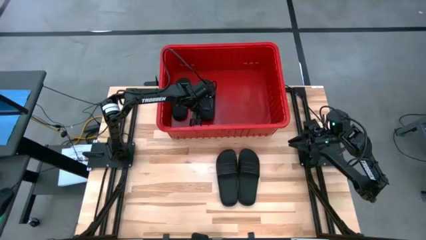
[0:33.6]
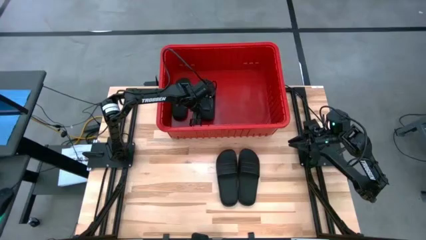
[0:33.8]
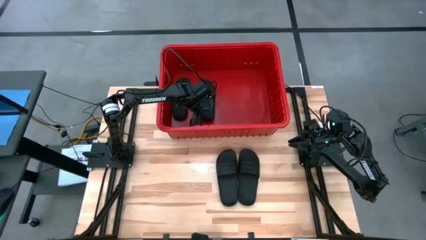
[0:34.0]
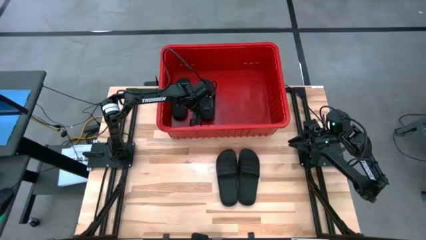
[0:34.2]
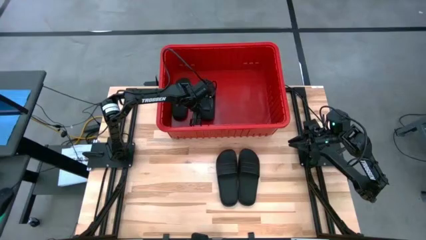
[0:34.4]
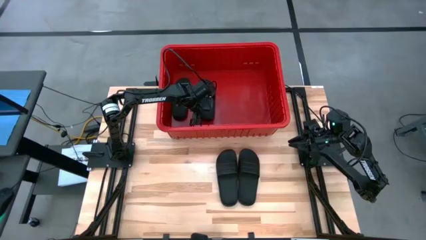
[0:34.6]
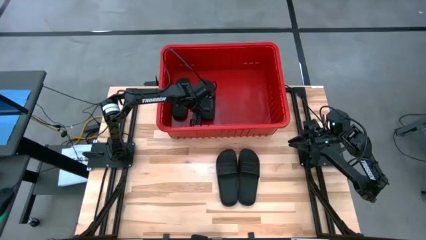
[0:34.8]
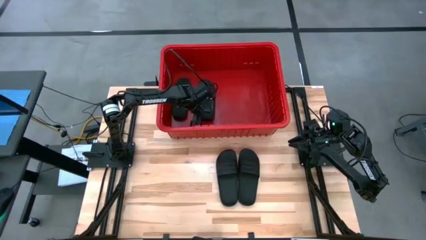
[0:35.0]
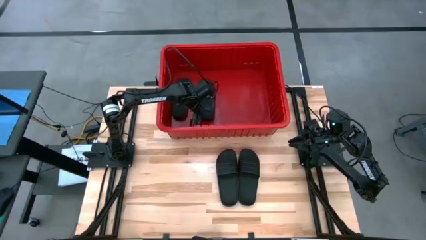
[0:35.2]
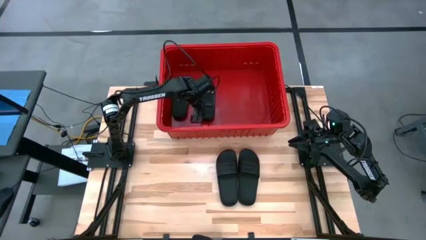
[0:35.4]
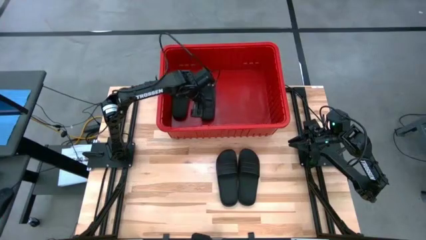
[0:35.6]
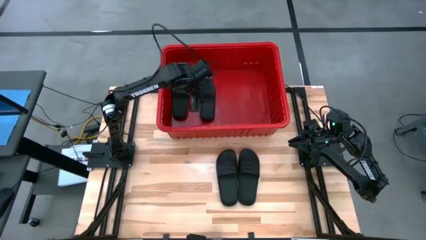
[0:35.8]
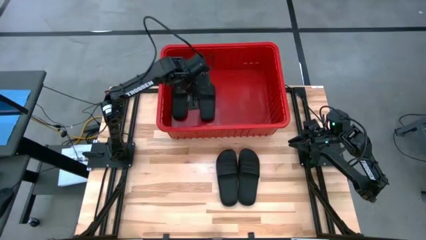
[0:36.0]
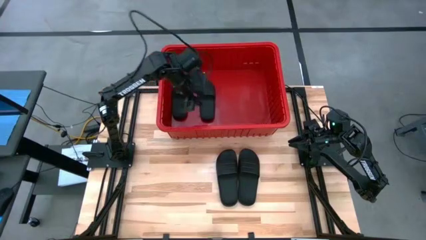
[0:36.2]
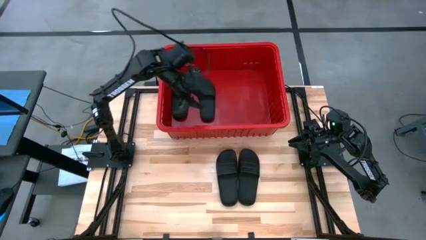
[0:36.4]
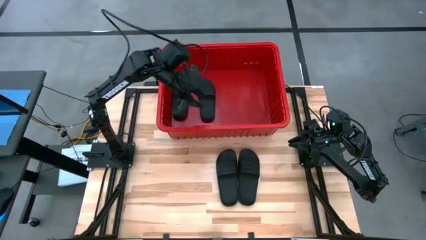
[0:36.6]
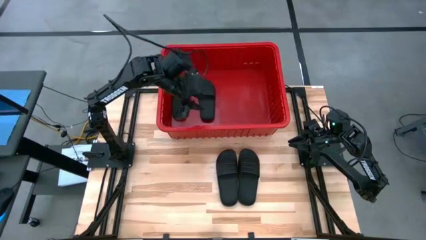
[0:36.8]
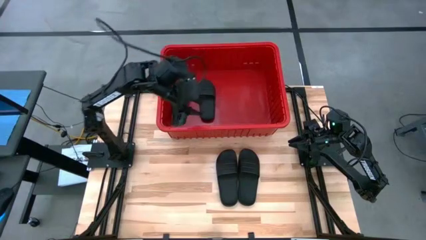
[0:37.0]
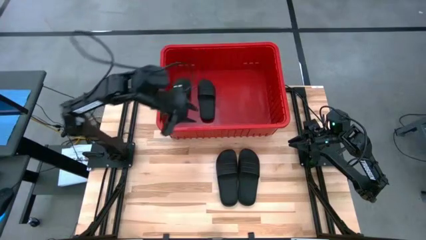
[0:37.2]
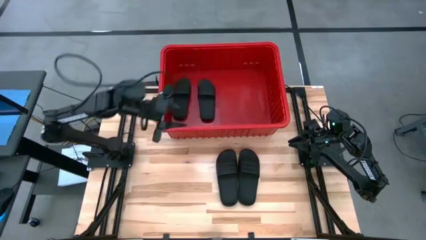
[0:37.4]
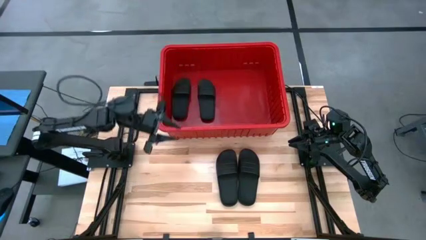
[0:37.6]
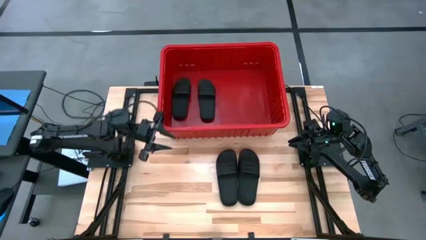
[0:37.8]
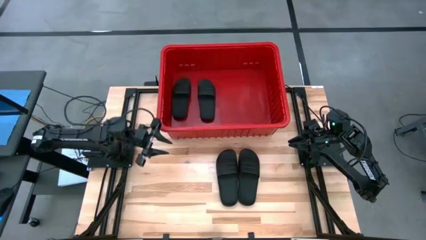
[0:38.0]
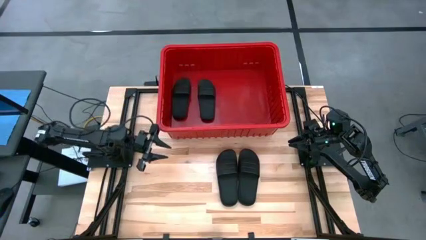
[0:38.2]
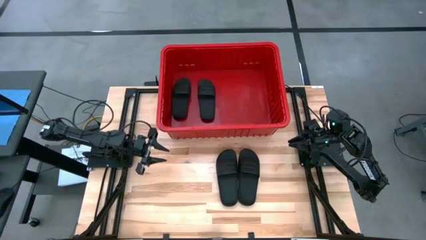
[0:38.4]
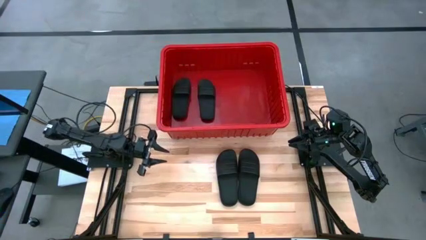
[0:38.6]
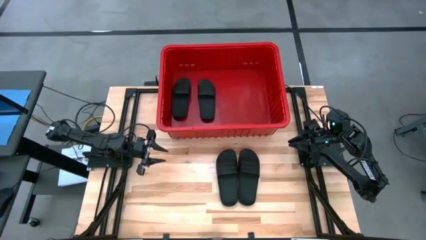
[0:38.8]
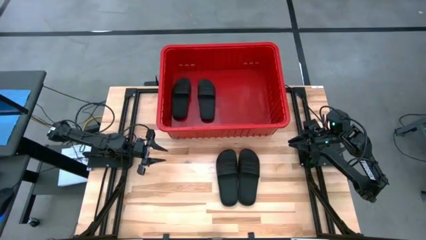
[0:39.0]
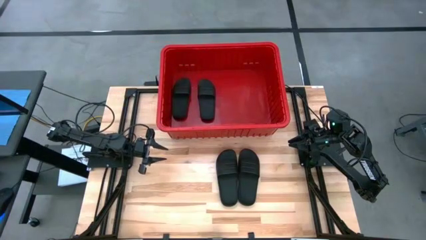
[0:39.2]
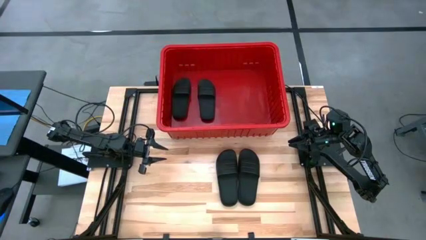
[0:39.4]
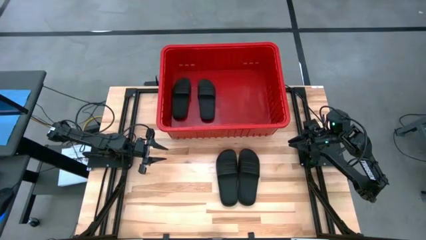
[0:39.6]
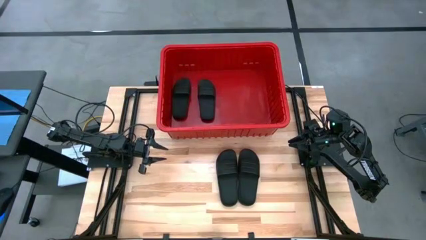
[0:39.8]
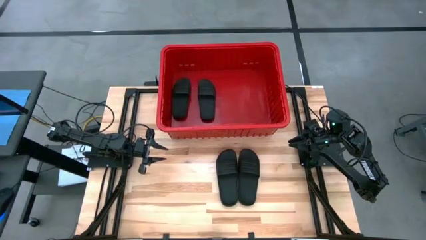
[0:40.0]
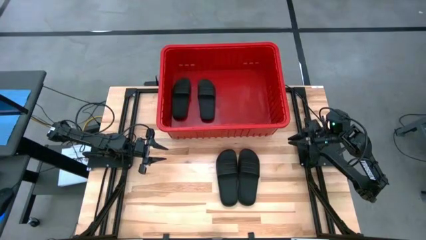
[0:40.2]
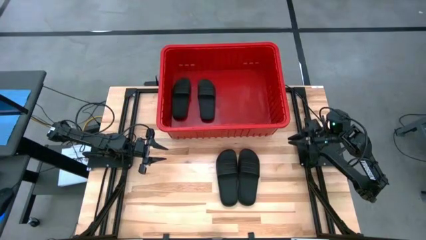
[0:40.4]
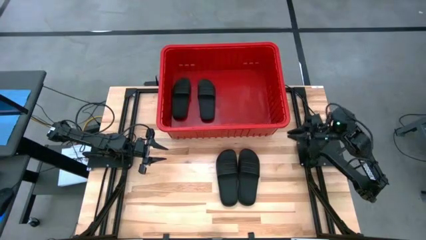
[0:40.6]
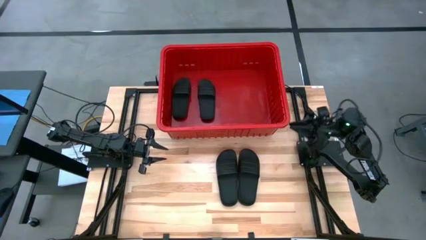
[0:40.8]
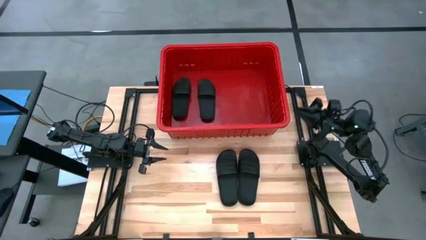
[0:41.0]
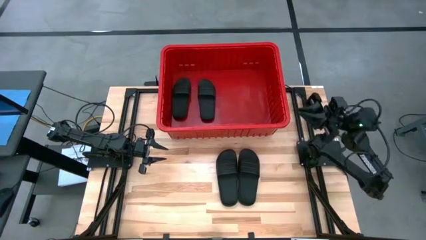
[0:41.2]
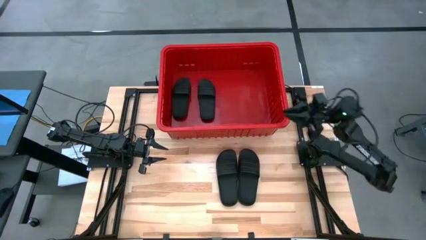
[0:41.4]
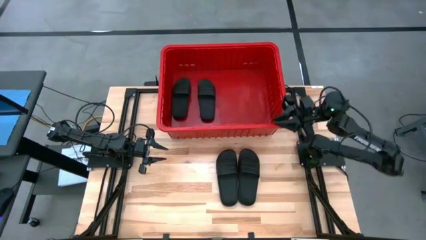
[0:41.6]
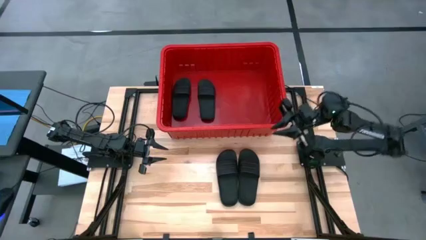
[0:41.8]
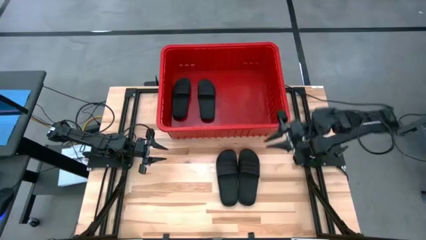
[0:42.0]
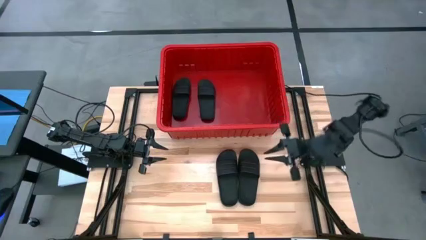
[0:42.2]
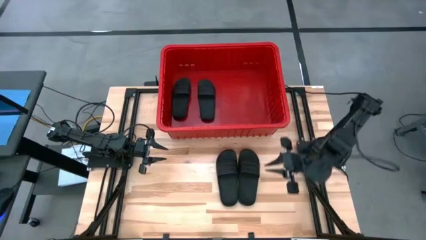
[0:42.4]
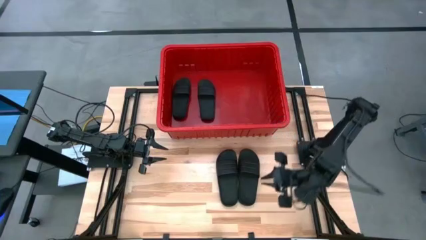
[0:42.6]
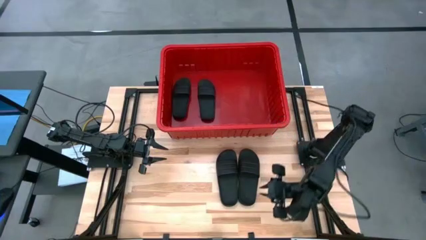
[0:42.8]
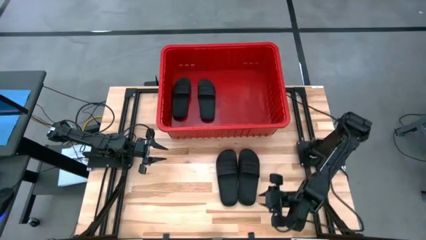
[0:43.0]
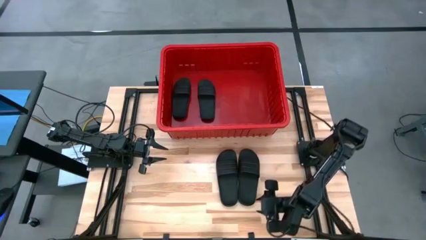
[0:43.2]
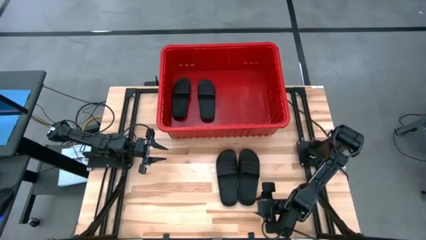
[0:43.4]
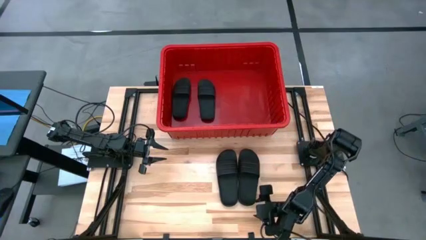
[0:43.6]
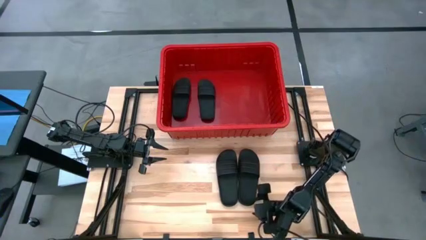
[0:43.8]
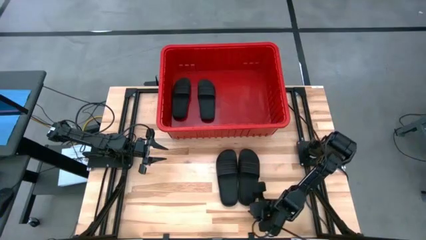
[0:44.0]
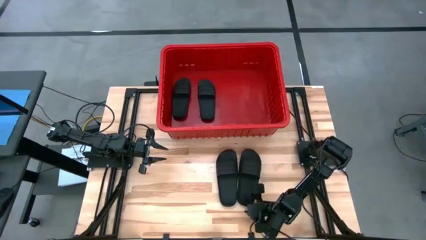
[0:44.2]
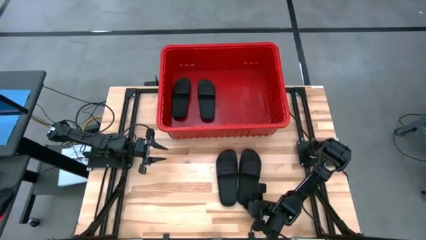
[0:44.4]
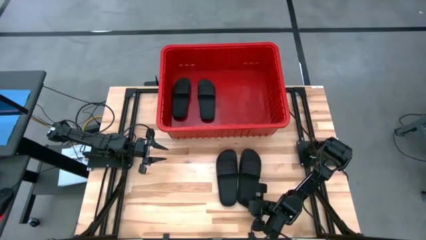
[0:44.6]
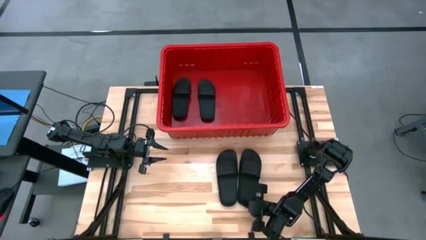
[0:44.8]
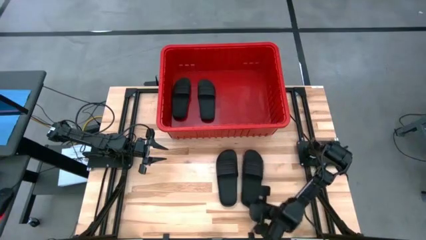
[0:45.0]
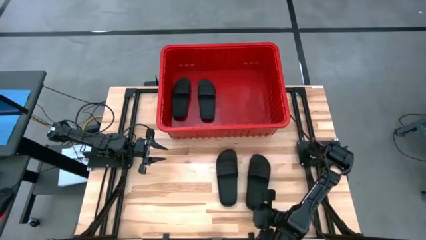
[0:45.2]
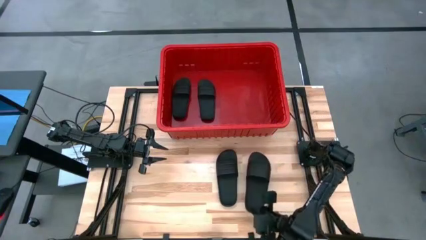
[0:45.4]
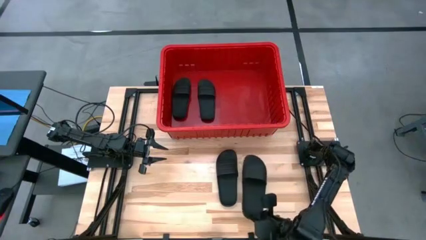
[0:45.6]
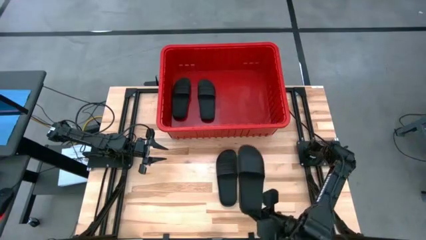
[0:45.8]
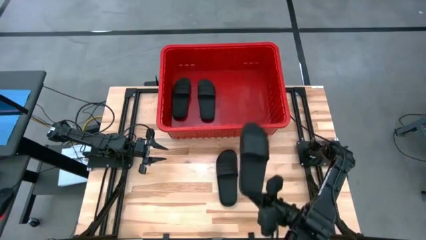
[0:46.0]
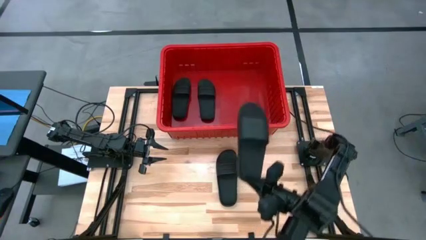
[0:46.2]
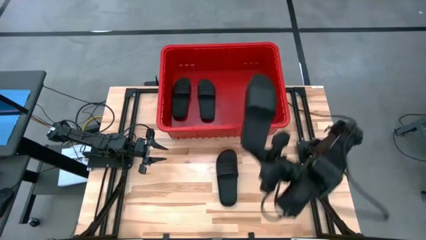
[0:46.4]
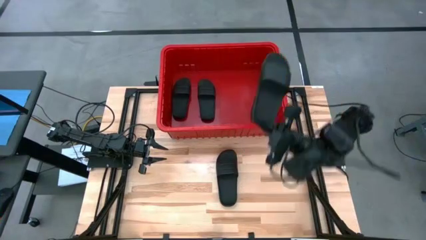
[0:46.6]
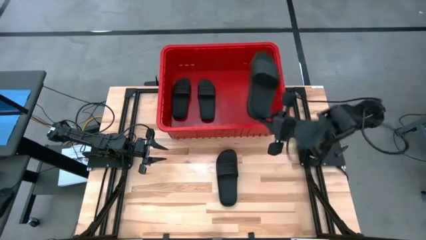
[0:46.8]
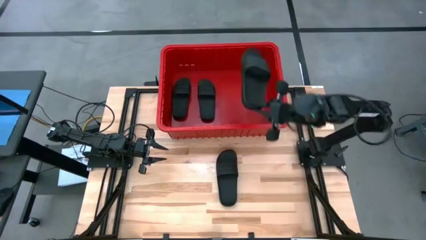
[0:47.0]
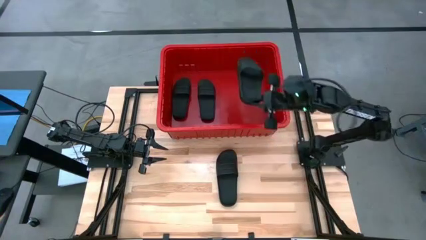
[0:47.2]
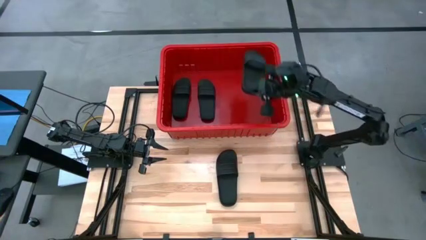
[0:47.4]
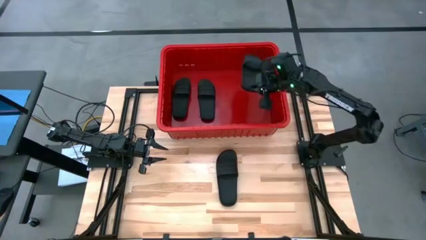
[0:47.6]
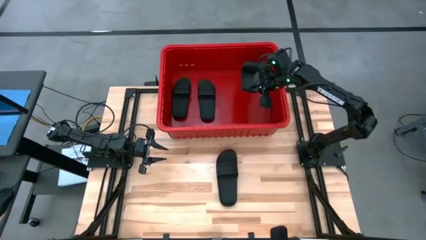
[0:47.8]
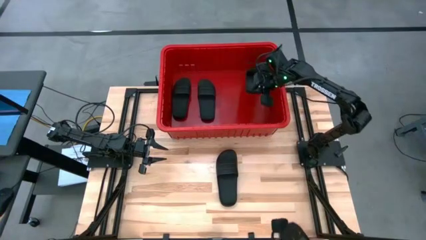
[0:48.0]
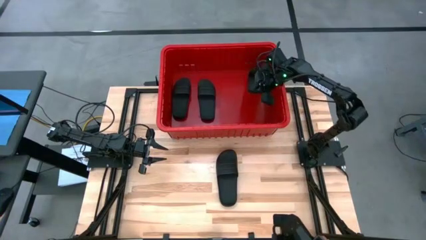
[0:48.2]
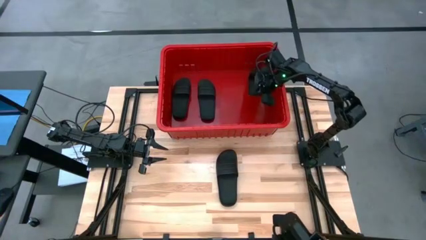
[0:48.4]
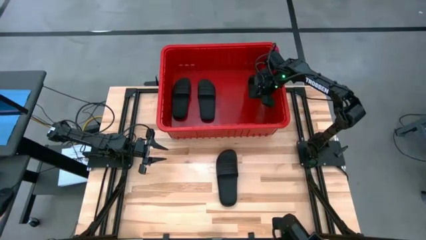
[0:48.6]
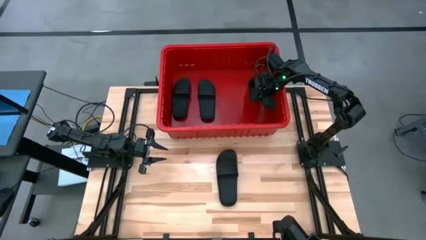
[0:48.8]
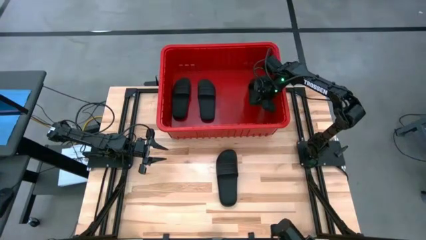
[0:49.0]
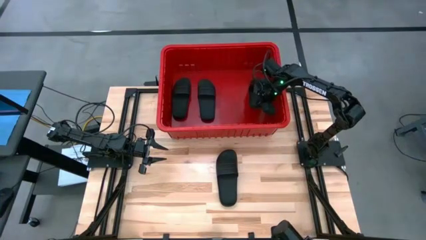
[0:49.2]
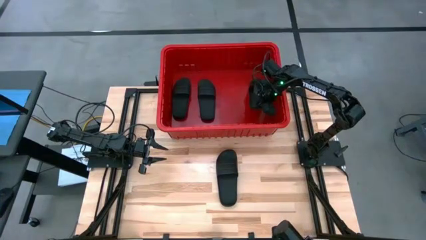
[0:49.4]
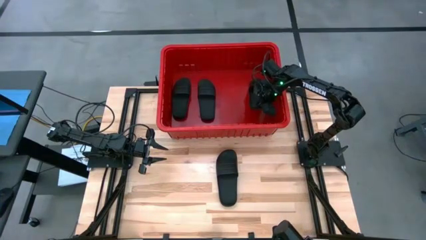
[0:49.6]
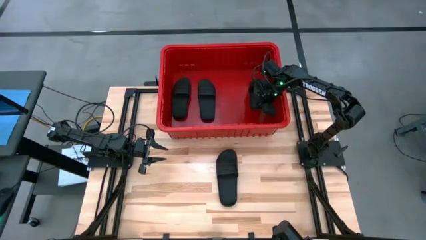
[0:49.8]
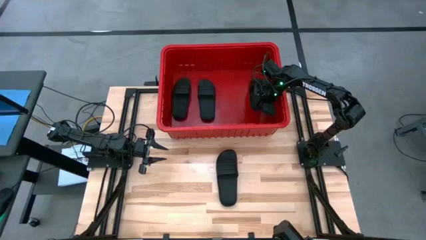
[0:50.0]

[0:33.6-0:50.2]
Task: Pick and place slides into bin
Put the right slide into the bin
